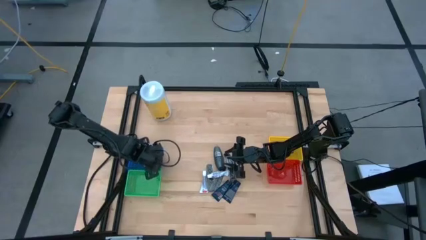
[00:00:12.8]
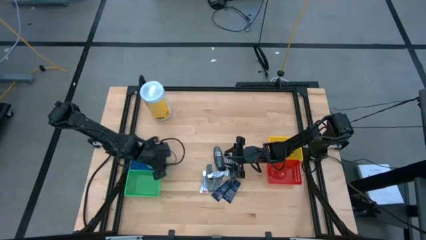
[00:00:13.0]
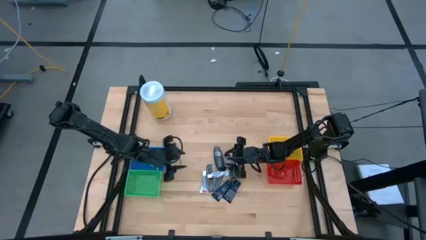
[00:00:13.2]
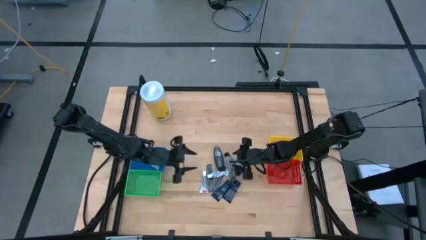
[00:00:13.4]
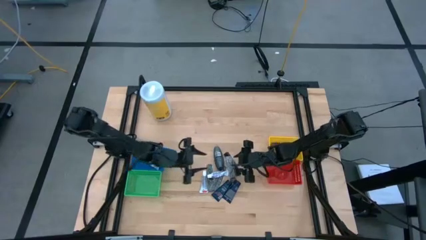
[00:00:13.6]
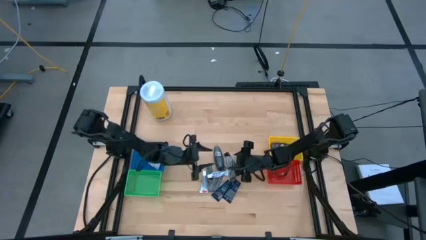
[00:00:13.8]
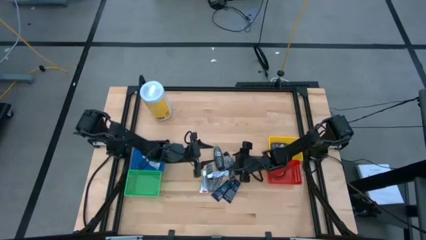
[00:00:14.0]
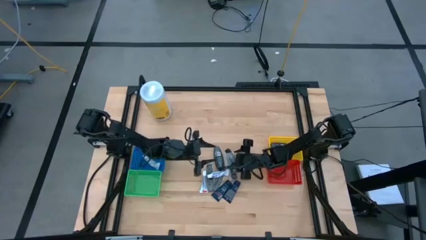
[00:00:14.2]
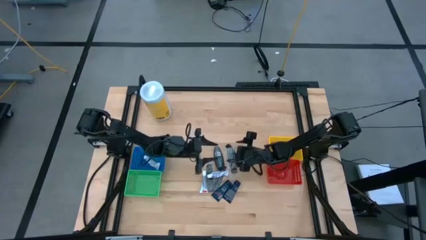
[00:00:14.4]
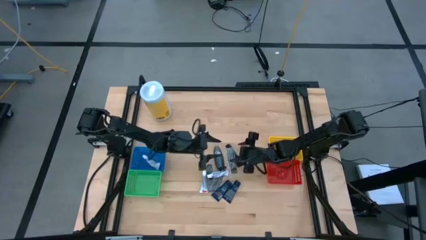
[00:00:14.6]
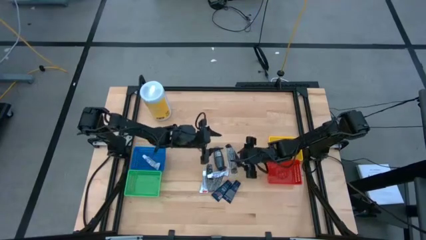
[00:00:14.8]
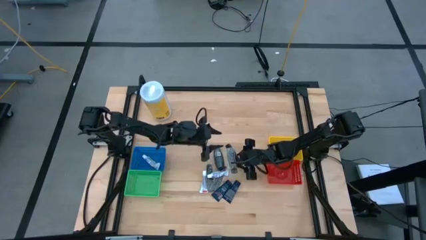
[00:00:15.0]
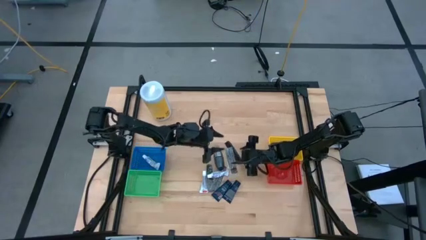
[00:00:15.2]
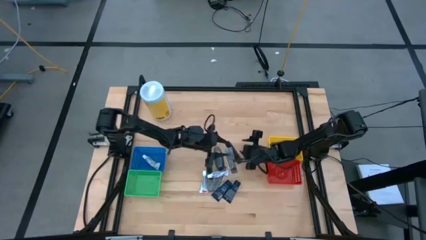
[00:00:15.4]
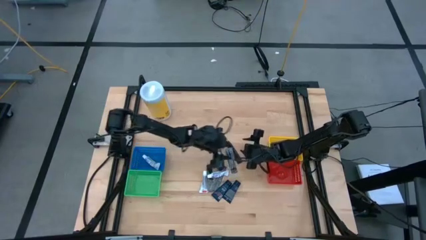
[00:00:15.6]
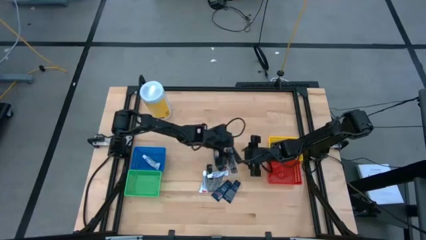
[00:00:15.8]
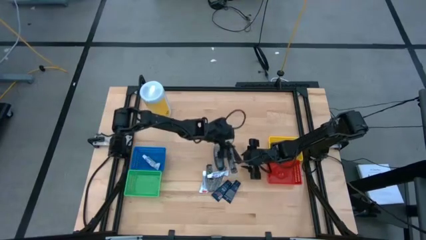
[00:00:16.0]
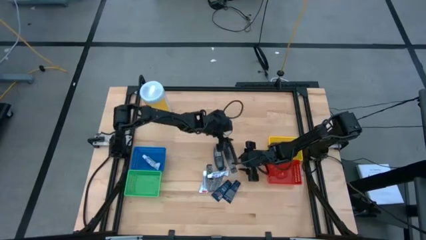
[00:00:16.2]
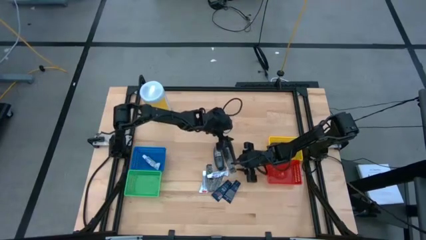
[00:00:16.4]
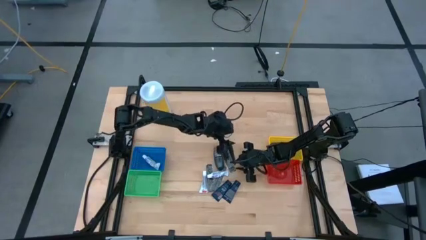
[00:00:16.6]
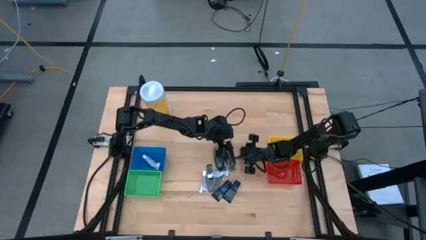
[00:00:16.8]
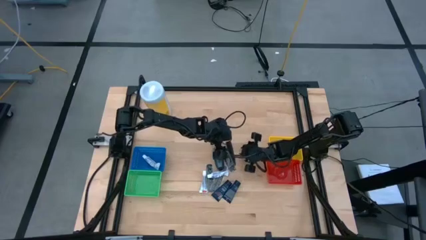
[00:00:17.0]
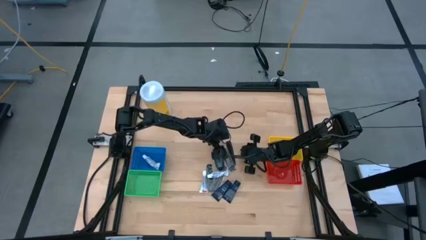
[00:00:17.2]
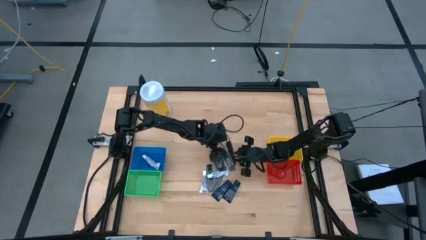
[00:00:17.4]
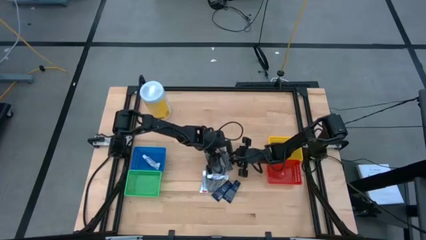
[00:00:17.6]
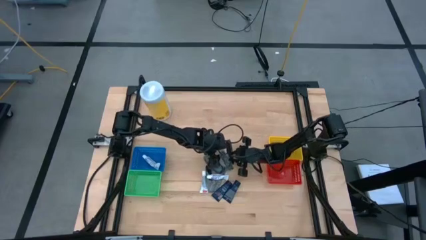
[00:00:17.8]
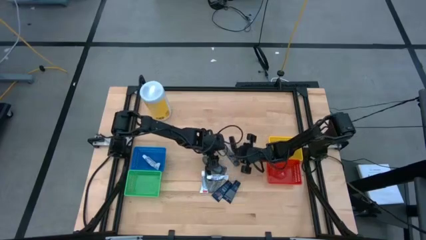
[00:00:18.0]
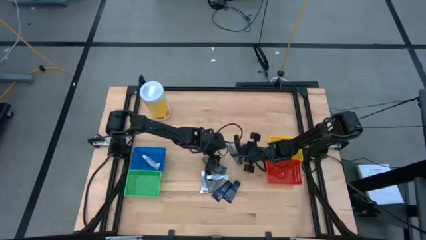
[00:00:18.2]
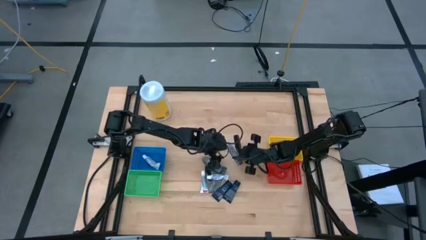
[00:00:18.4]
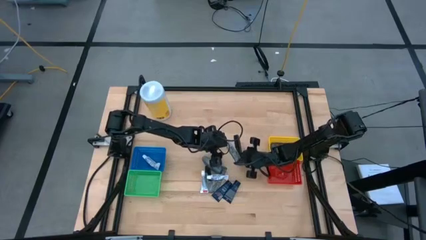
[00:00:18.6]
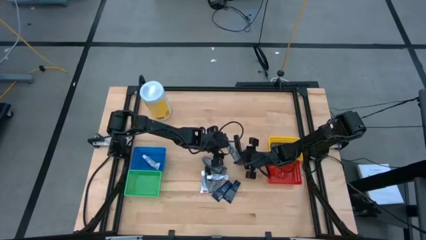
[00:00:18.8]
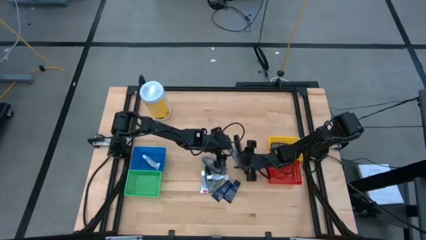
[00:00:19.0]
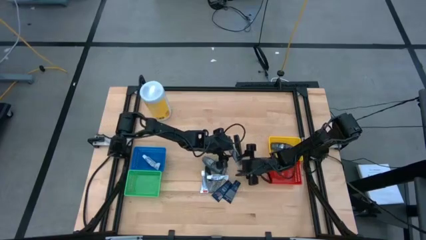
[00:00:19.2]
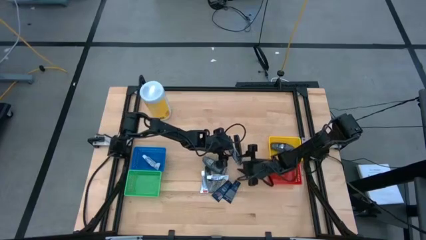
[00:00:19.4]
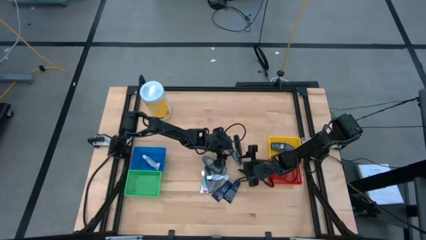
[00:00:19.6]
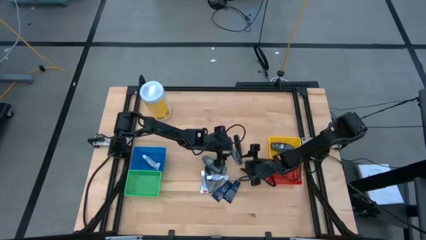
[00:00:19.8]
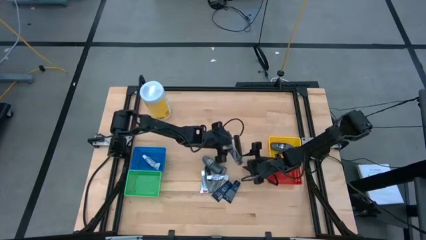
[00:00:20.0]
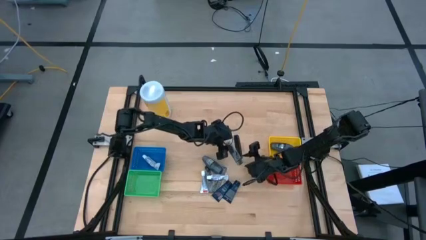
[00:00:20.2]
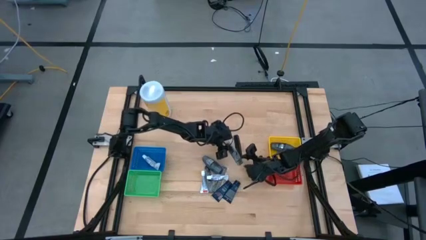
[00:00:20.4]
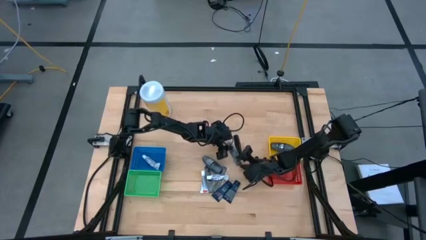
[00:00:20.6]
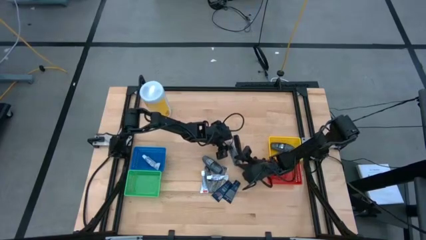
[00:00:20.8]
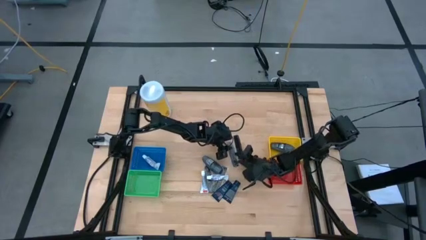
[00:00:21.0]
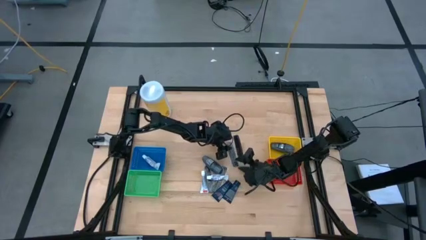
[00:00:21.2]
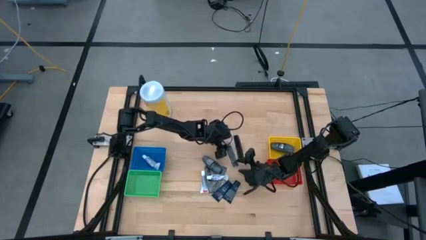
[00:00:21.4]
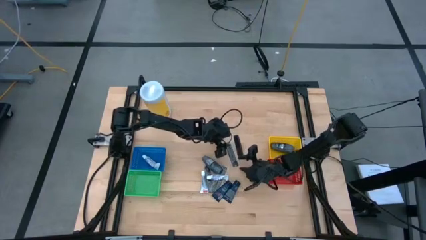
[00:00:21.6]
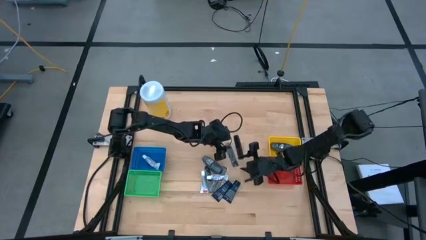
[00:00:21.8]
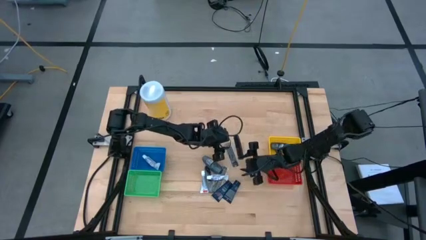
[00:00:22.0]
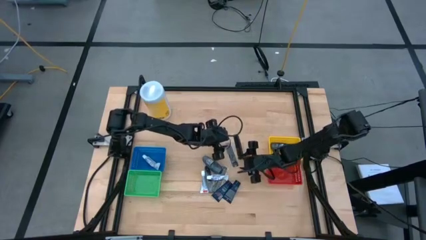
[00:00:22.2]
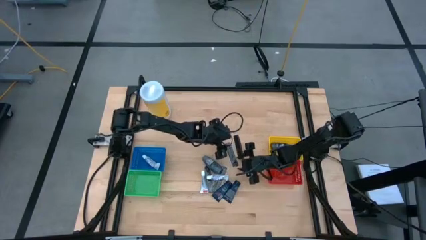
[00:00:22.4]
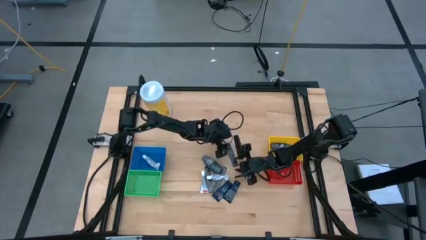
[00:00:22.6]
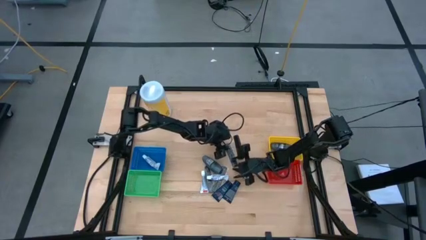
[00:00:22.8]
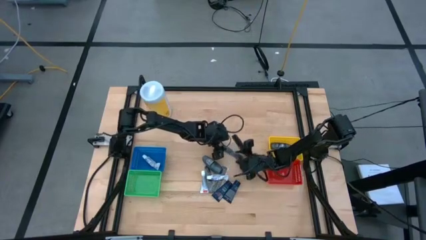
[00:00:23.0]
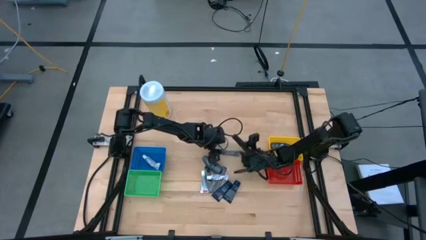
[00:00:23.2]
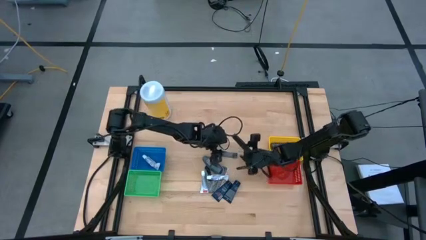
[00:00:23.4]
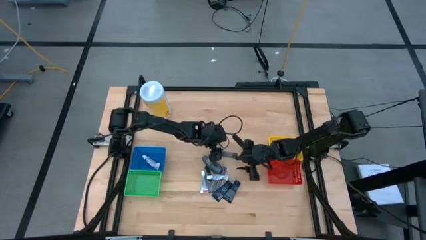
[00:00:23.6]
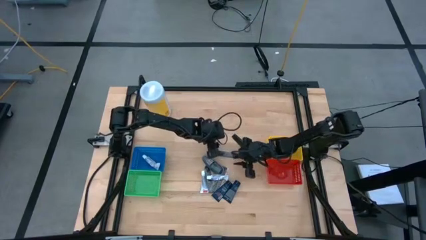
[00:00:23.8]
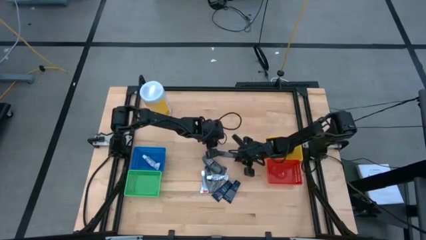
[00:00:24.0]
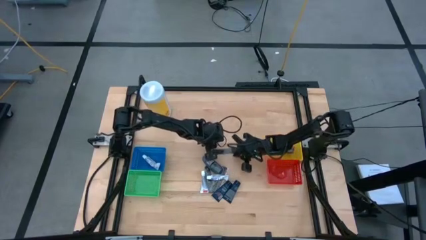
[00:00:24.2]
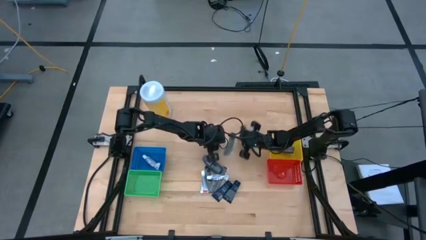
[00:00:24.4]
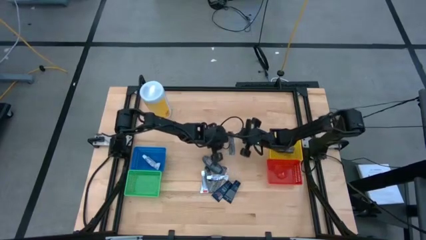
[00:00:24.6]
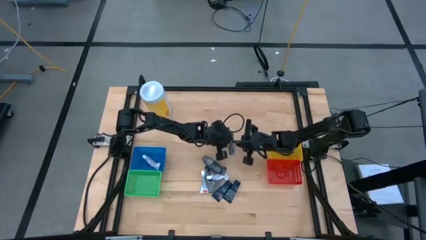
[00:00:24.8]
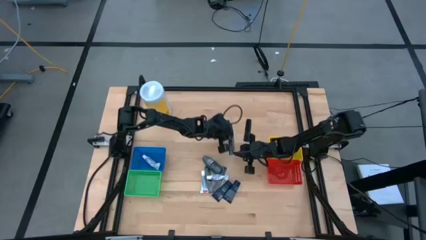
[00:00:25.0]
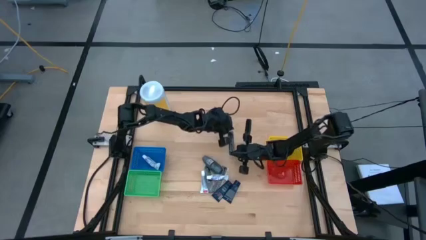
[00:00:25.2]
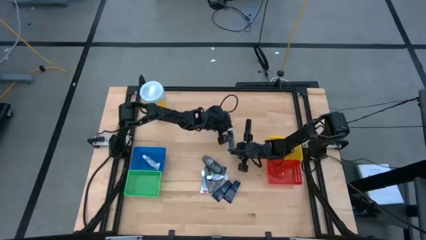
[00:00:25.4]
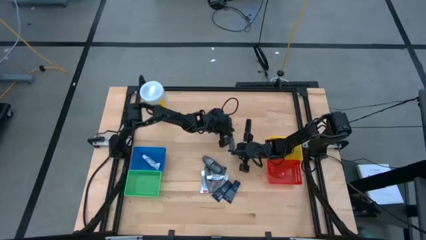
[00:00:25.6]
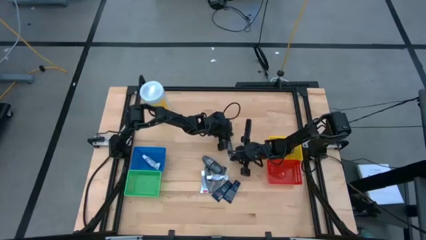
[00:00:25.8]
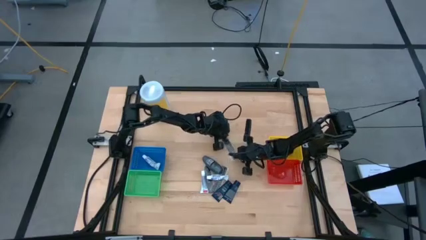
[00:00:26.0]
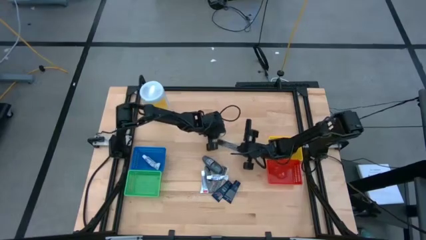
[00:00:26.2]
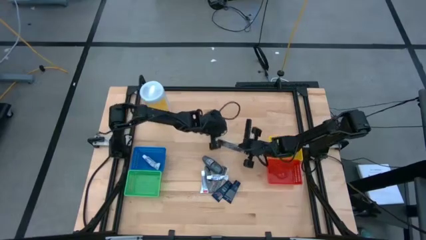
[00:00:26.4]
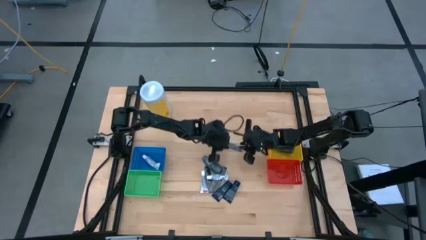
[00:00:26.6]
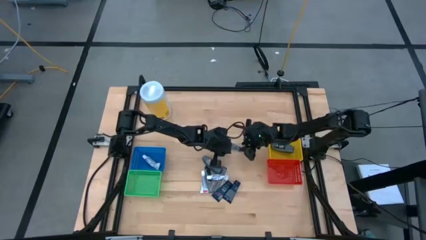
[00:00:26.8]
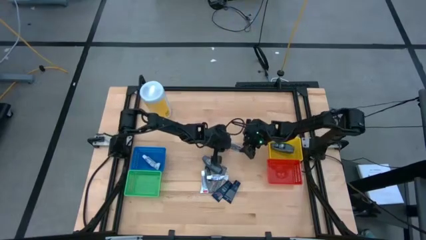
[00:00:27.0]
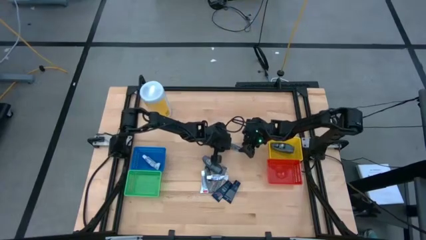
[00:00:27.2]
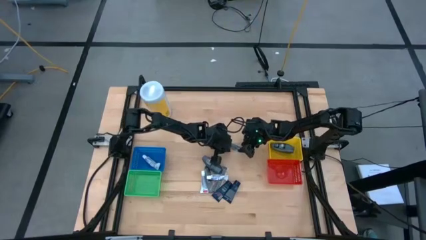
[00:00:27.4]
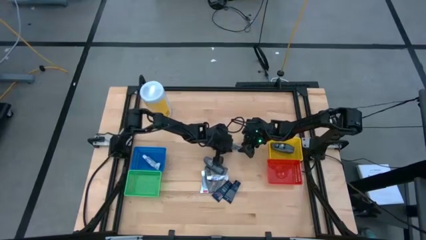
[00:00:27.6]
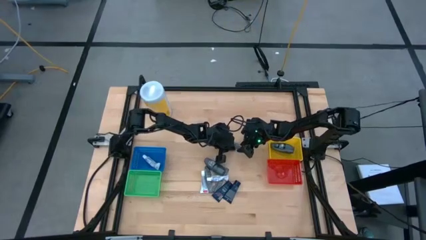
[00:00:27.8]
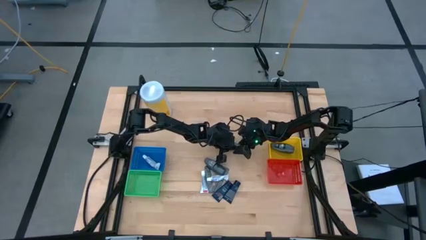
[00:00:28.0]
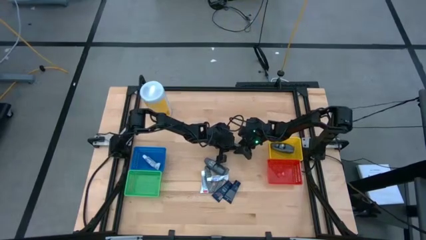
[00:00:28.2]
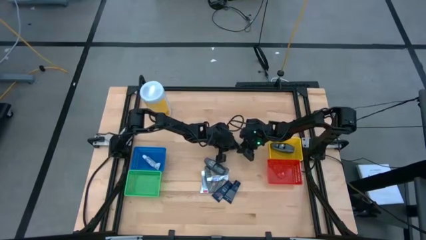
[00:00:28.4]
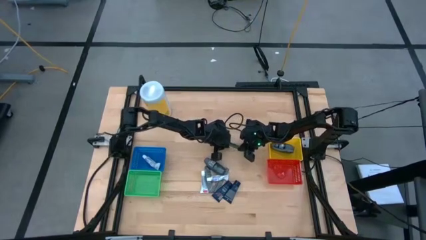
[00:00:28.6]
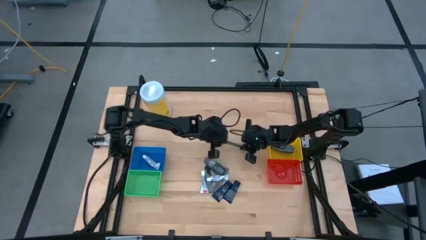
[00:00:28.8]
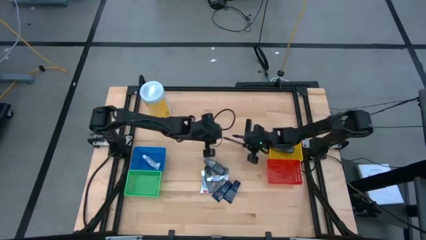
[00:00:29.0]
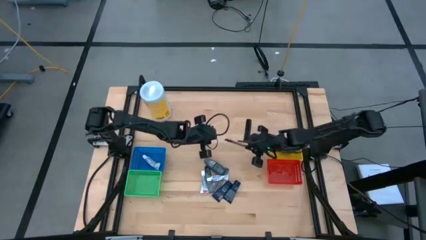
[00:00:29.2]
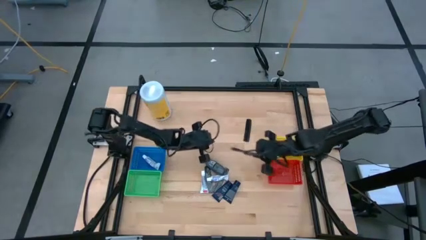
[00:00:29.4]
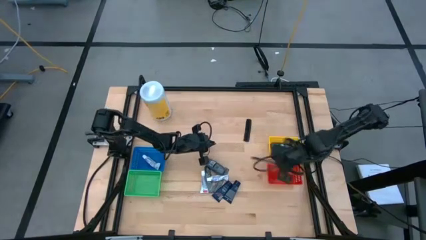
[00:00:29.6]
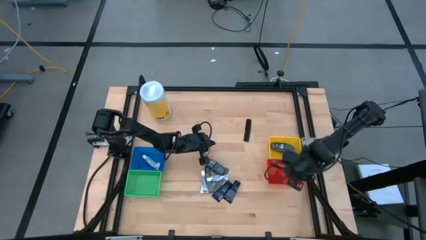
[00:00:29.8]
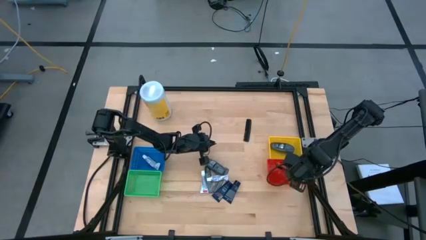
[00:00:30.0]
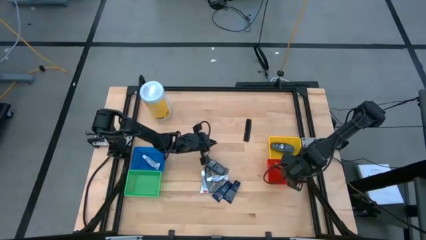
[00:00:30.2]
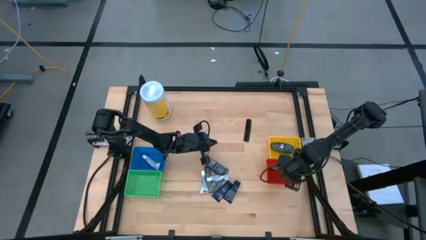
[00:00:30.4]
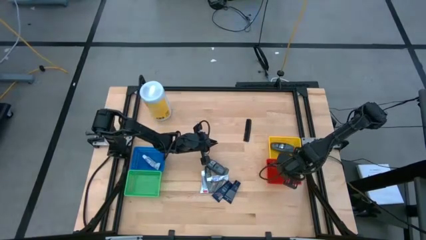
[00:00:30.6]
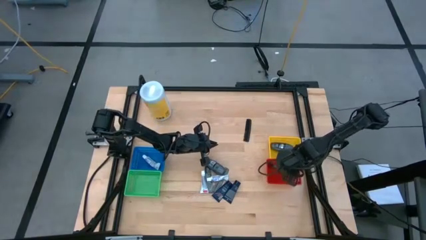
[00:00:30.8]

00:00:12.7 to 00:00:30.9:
Task: Pick & Place Travel size toiletries
Put the black comb into the red basket
